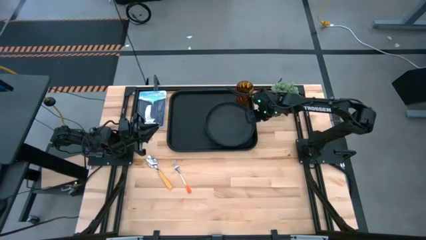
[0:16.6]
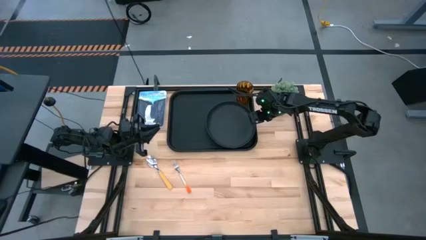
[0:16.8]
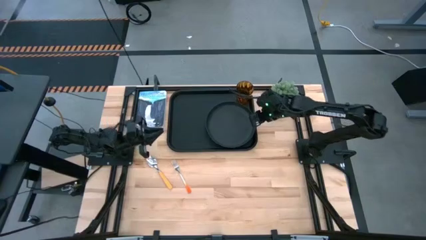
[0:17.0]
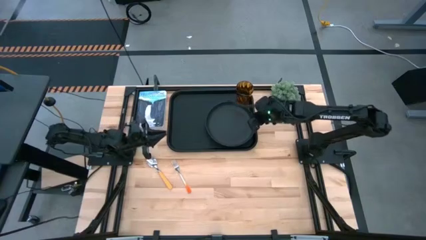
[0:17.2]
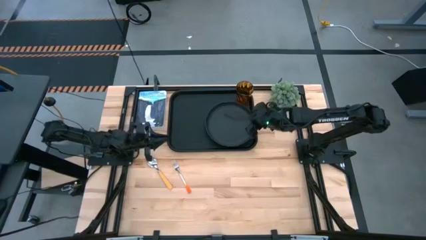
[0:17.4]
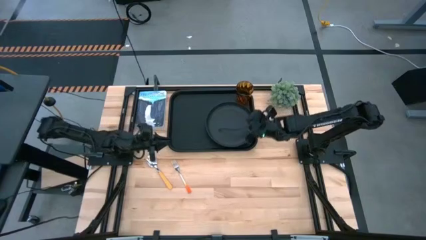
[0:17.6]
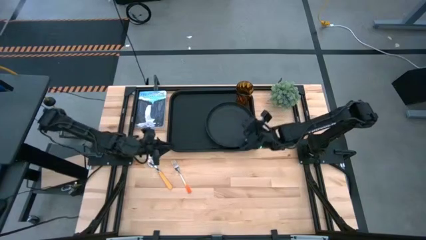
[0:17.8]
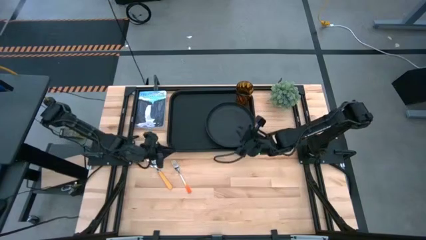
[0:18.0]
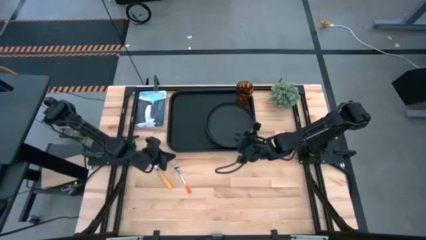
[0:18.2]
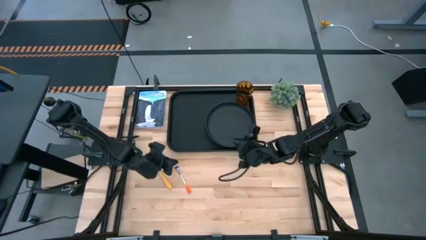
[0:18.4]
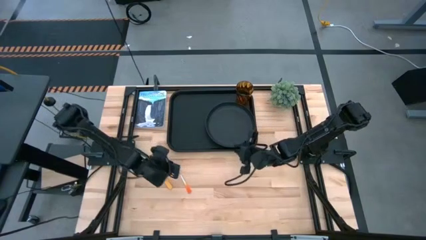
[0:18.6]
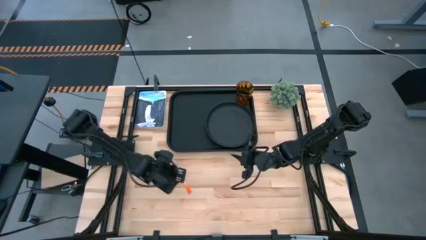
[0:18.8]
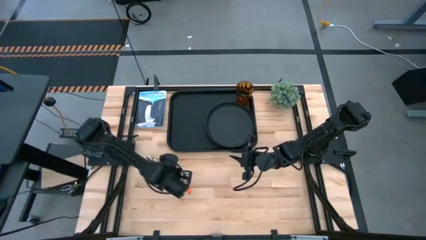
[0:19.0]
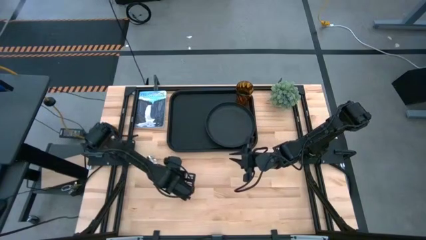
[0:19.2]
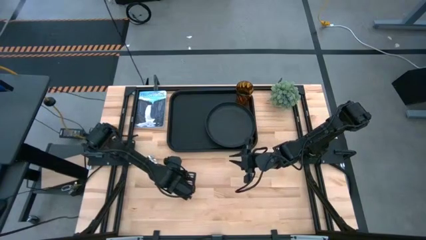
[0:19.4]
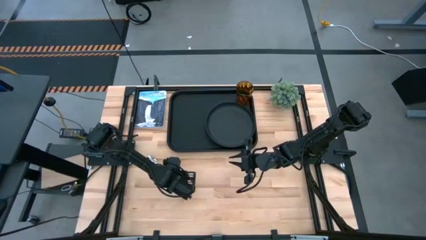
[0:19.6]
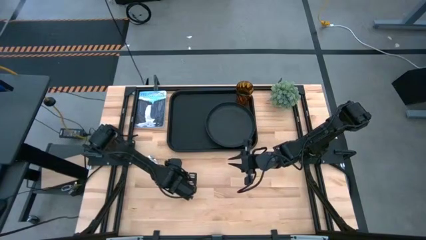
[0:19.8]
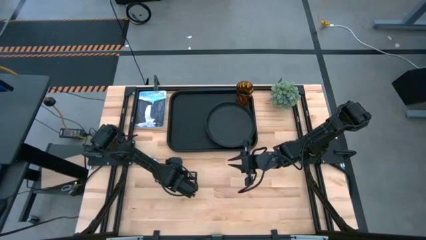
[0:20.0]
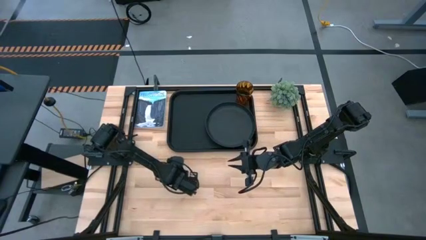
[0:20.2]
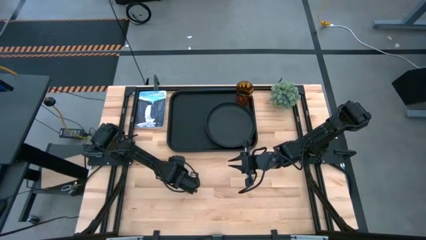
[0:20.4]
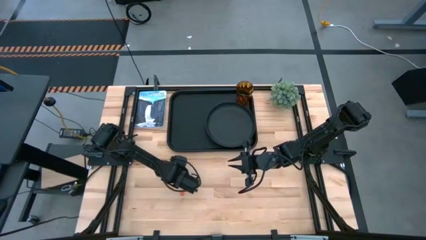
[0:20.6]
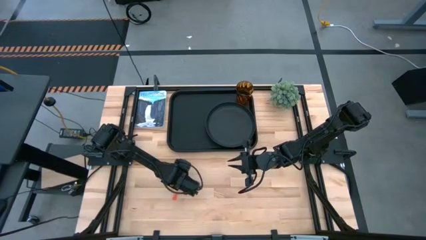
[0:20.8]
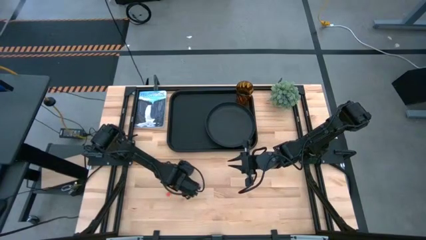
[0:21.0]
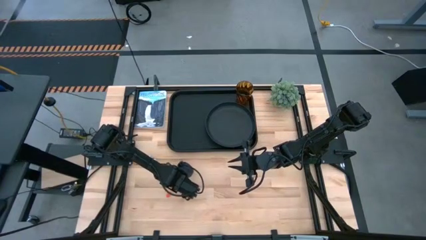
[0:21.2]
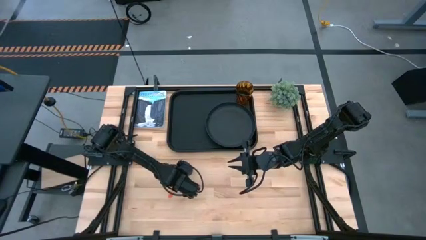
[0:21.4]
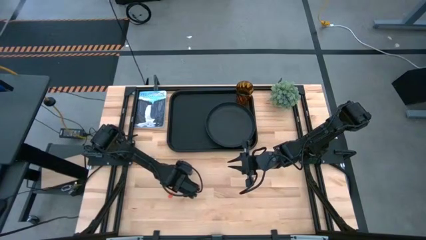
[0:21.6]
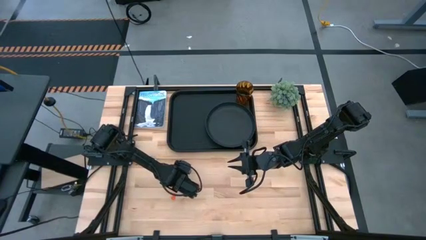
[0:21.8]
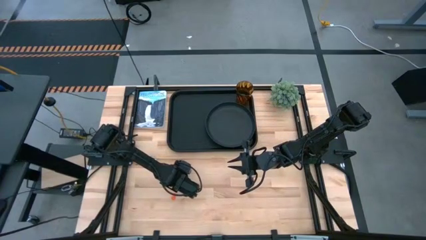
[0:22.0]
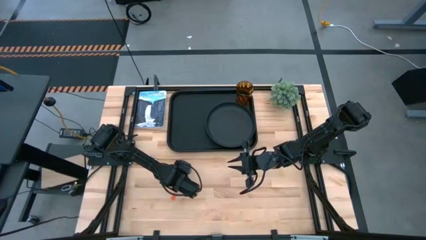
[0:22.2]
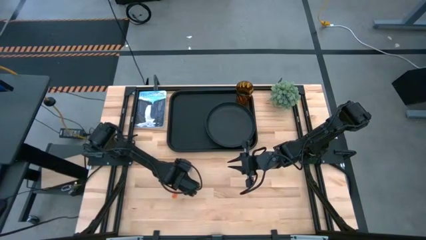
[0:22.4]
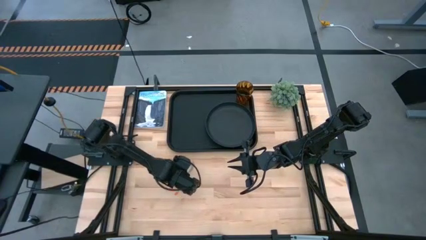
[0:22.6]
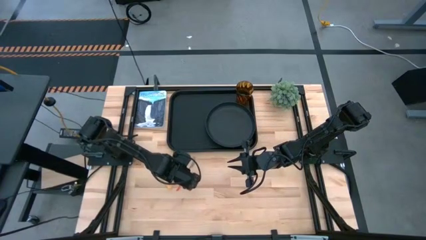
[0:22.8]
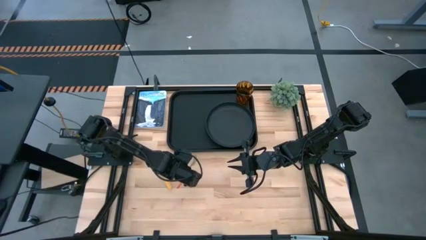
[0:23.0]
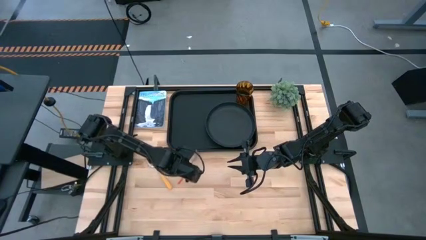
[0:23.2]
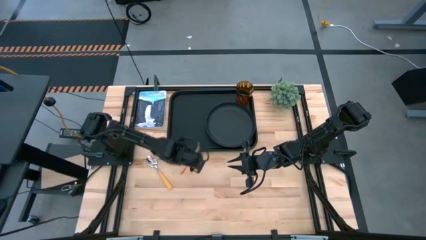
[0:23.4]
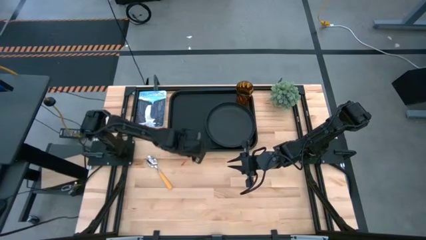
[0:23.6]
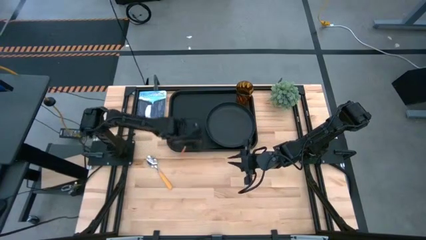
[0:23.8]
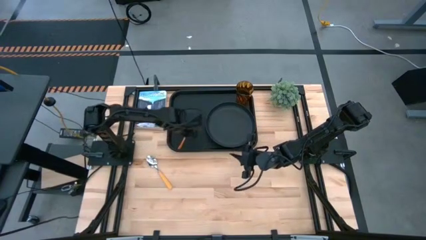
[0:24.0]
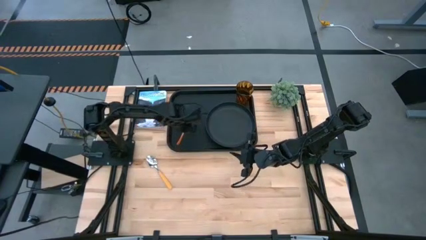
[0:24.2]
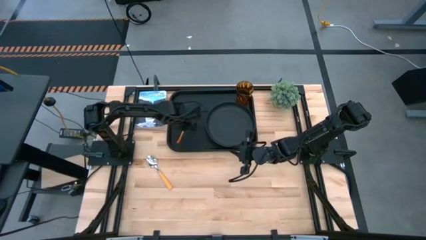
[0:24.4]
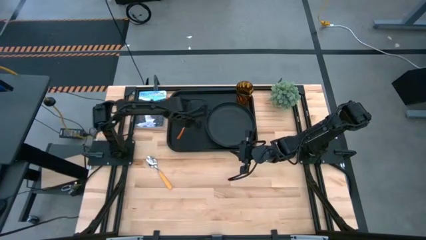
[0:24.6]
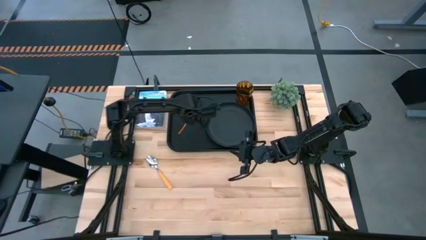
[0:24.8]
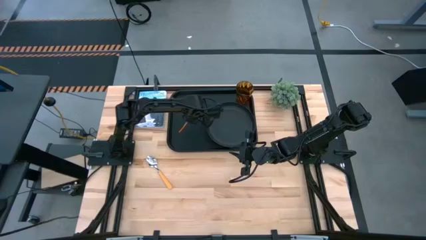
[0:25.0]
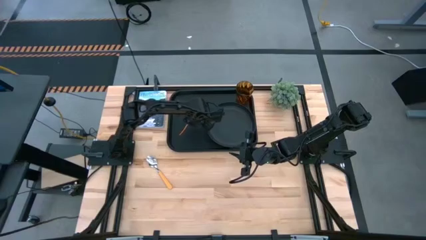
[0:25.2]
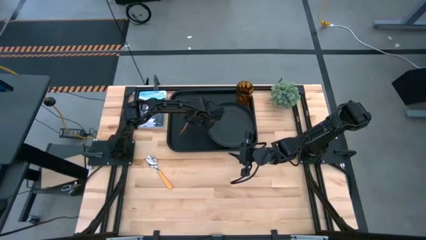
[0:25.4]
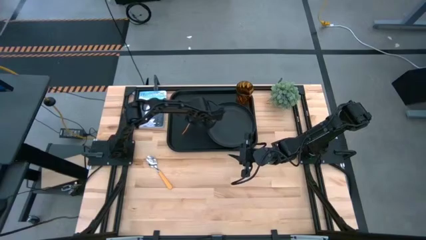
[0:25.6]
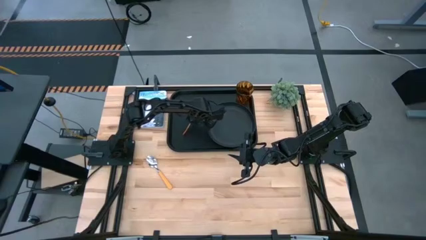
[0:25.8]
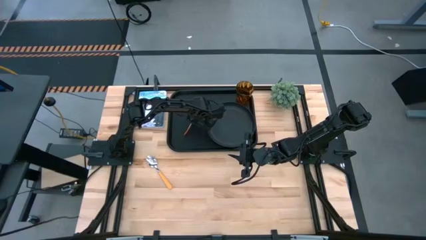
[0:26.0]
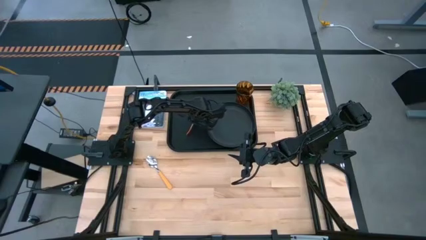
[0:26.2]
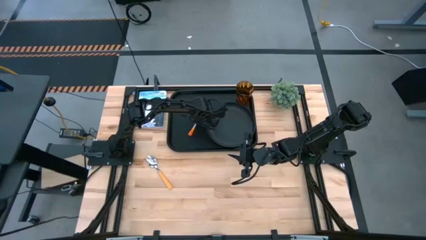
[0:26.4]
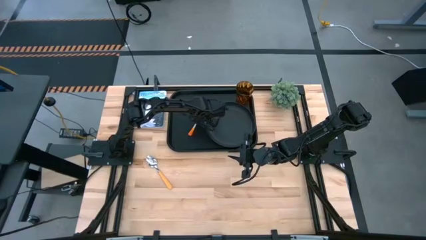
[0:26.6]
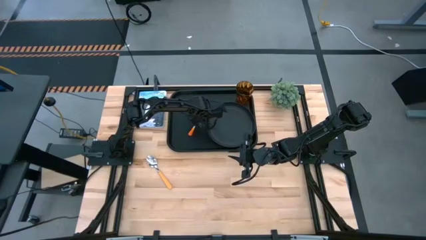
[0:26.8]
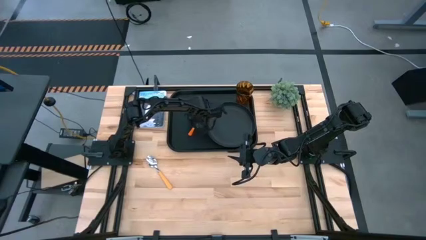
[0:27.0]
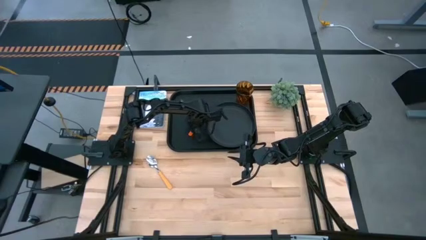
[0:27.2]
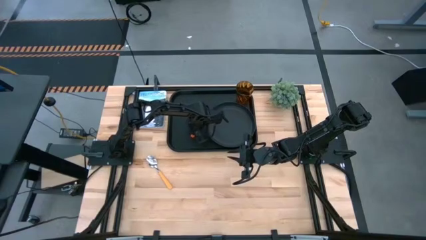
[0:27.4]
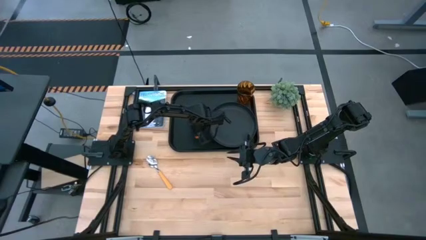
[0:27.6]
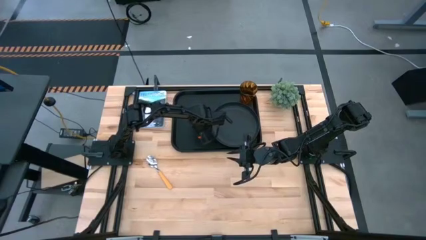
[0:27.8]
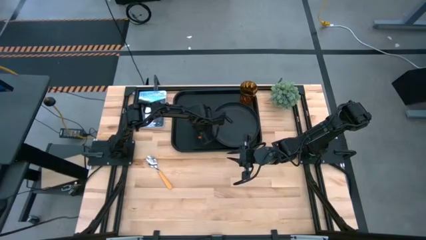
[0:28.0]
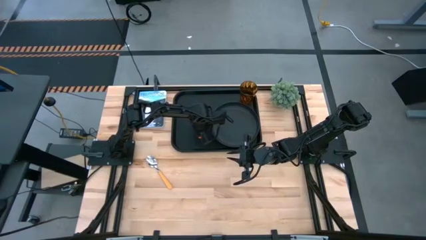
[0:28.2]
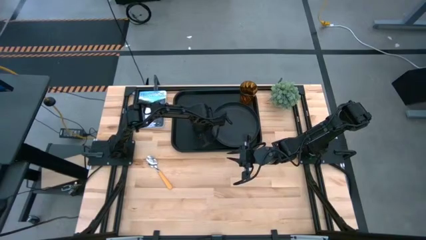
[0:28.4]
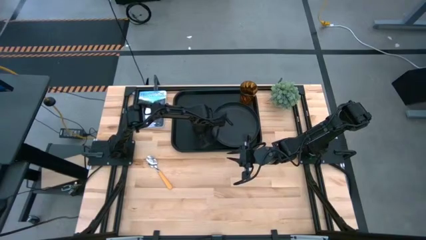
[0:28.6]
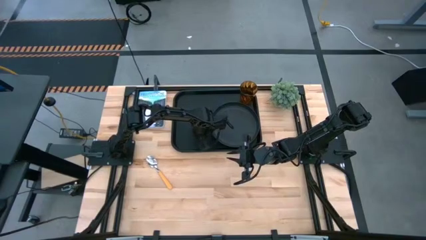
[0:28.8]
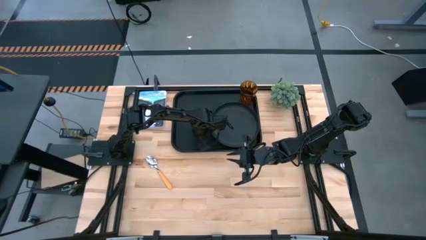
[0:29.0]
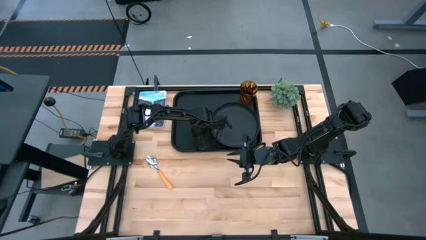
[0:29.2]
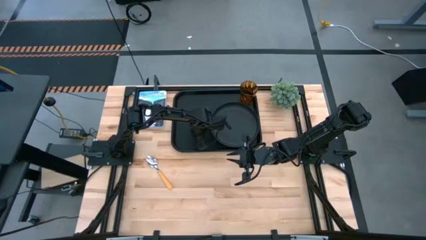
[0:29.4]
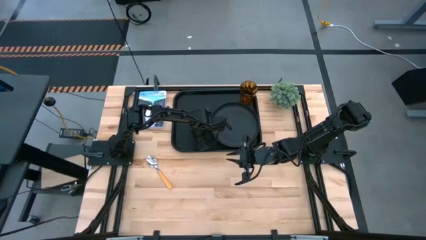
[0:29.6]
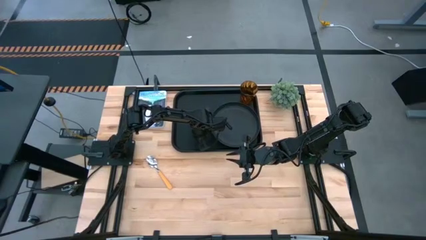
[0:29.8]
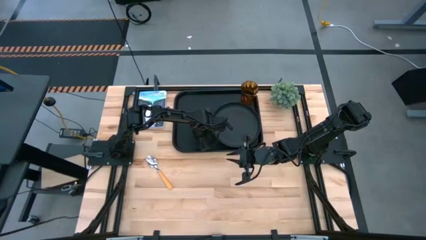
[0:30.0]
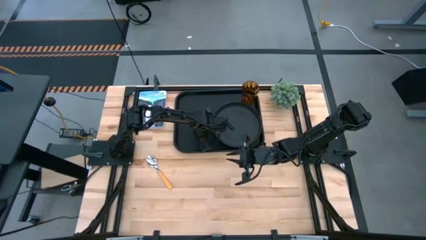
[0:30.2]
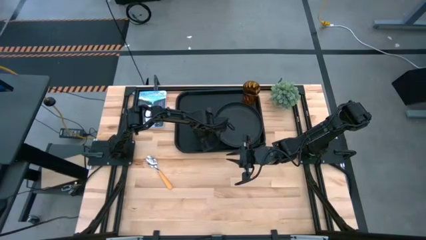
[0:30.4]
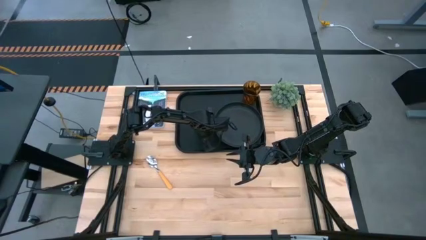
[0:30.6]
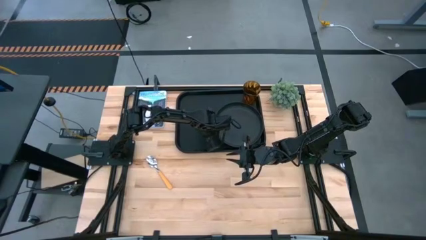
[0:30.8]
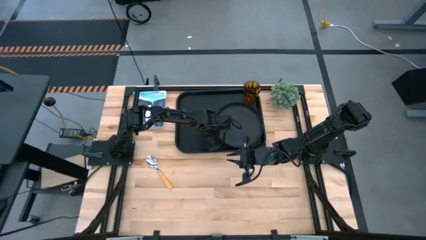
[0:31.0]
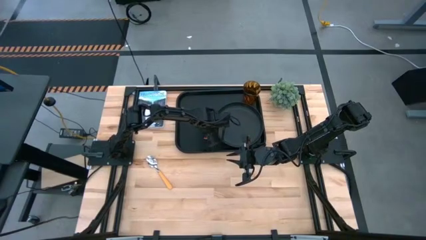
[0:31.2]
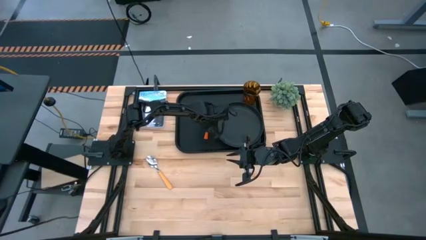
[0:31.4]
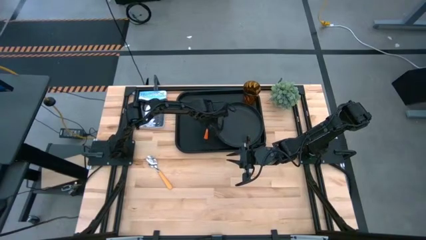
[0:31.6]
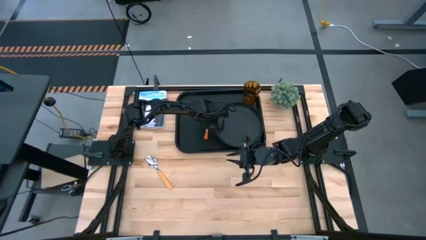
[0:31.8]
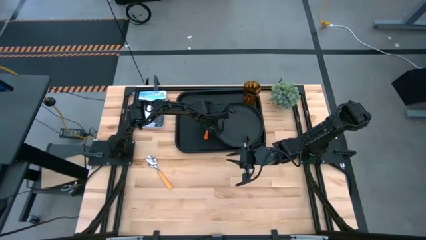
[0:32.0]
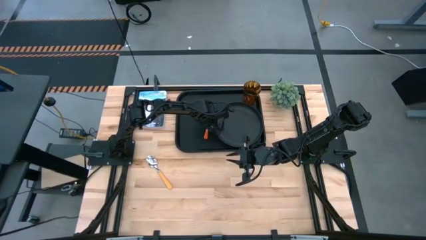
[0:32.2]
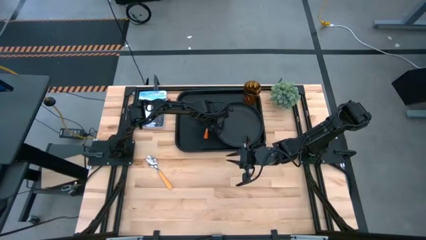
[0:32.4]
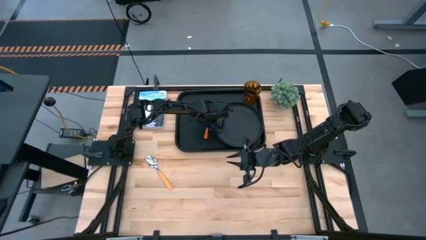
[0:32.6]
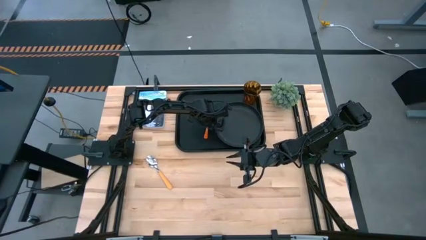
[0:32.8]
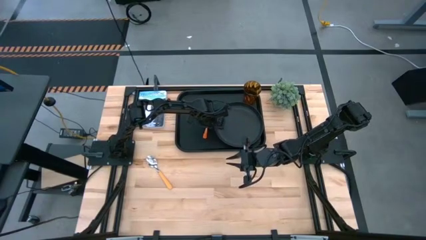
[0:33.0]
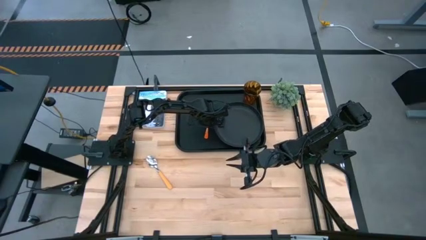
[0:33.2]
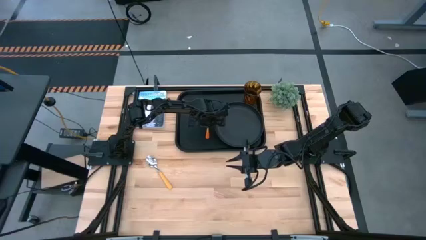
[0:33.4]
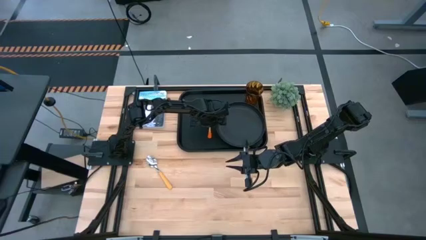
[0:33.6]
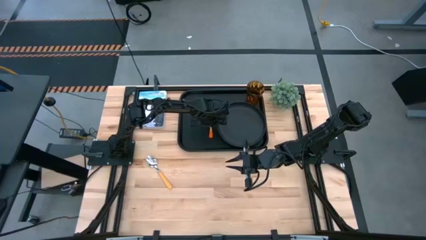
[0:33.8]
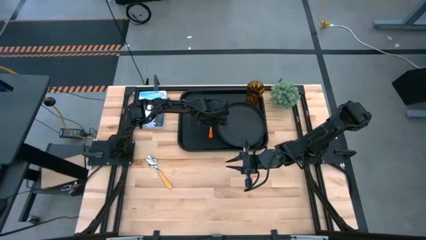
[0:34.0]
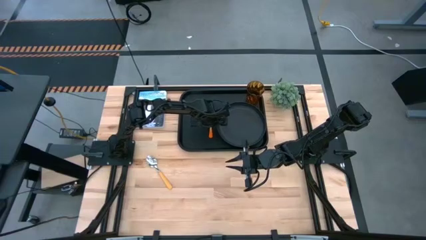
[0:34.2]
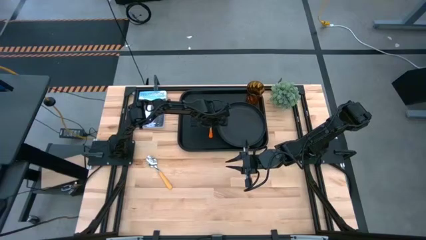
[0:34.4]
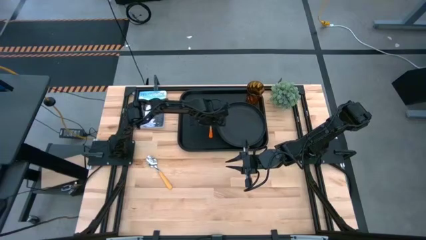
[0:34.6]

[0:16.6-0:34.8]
Task: Pick and place plate/cup/fork/spoon on tray
Put the orange fork on the black tray to the left side of the black plate
